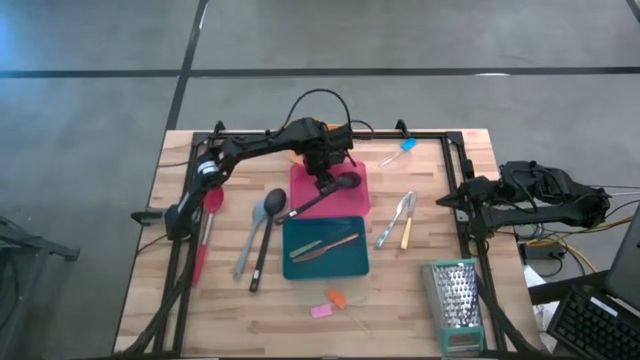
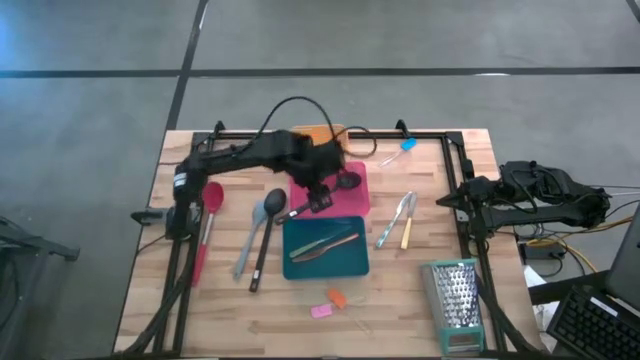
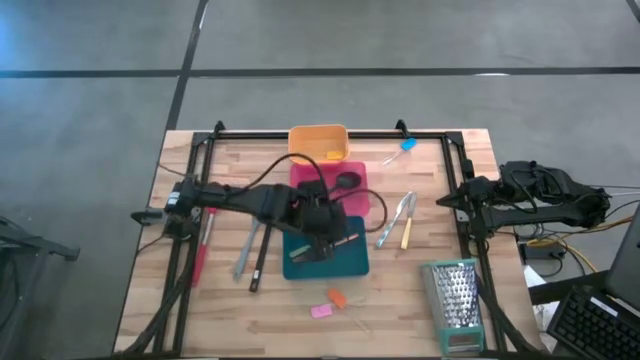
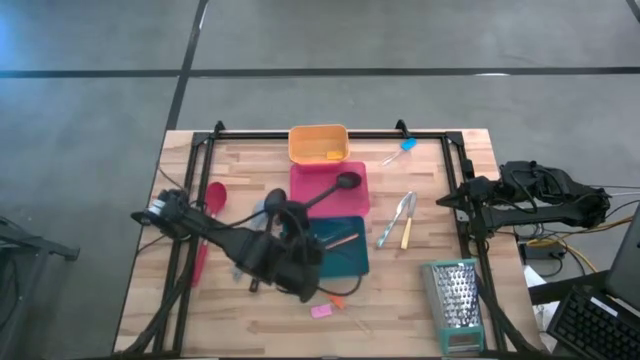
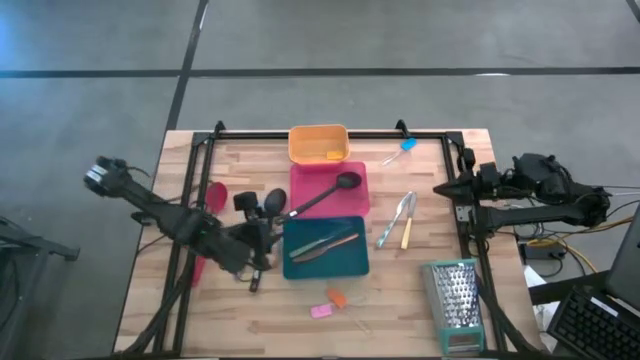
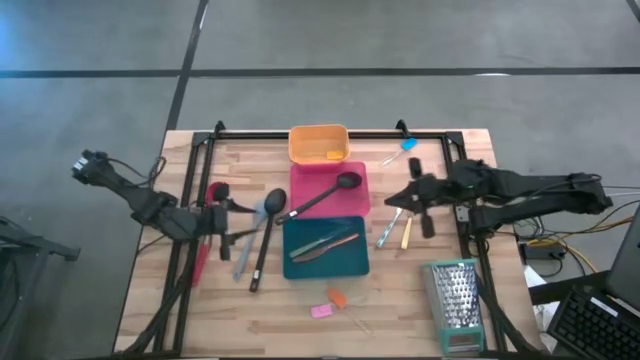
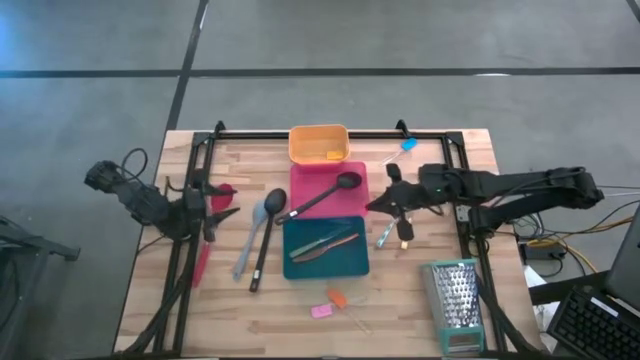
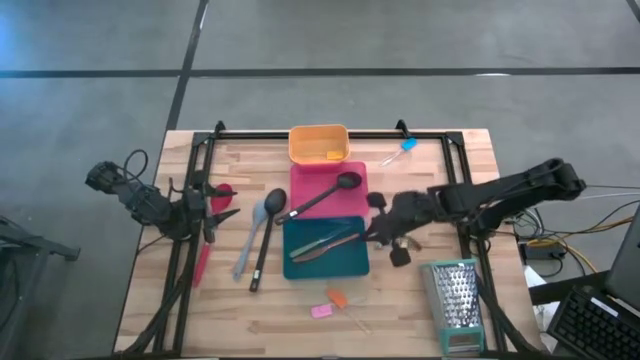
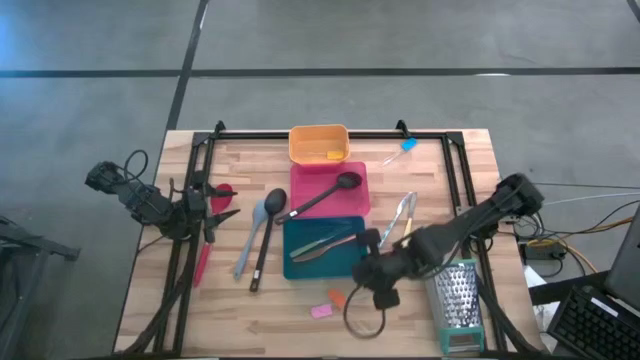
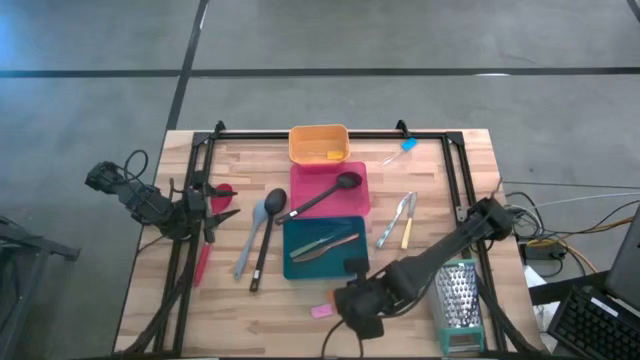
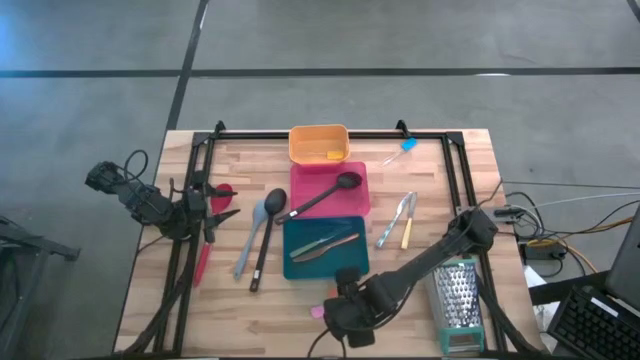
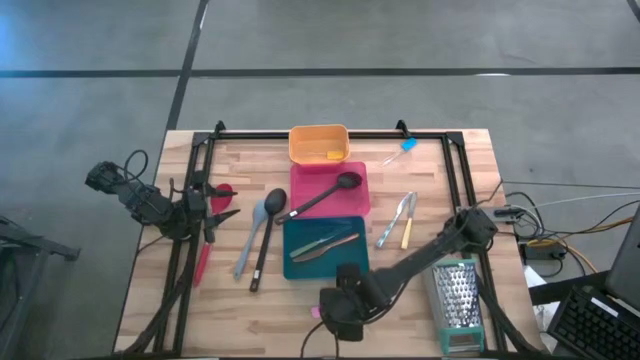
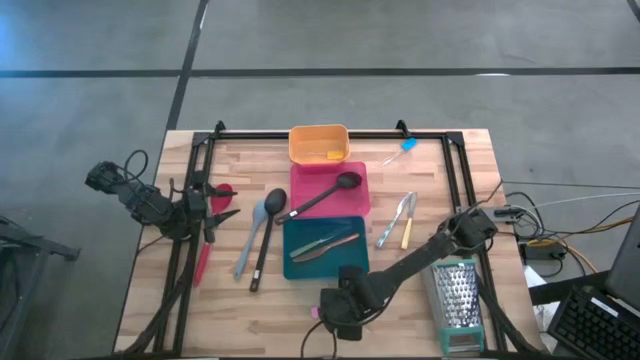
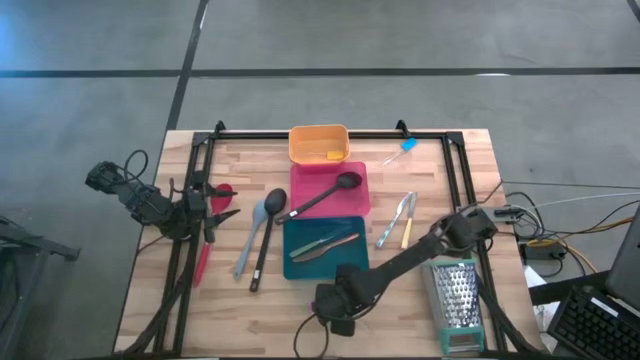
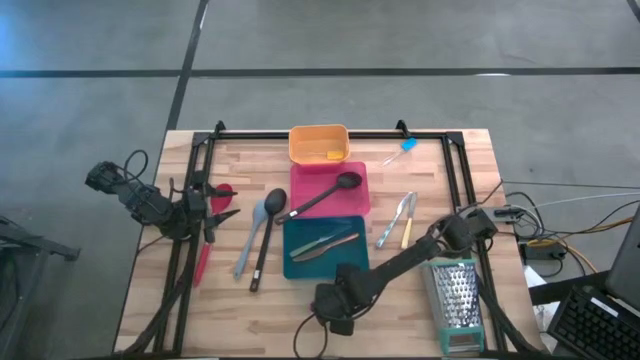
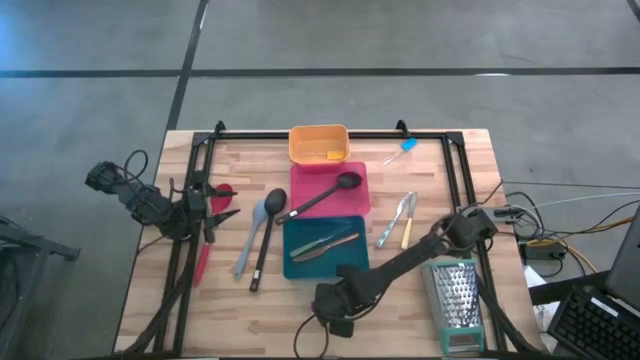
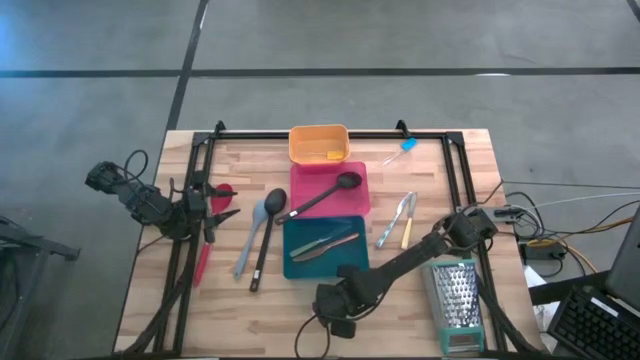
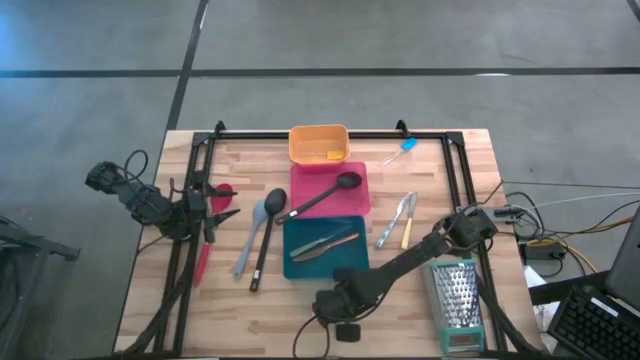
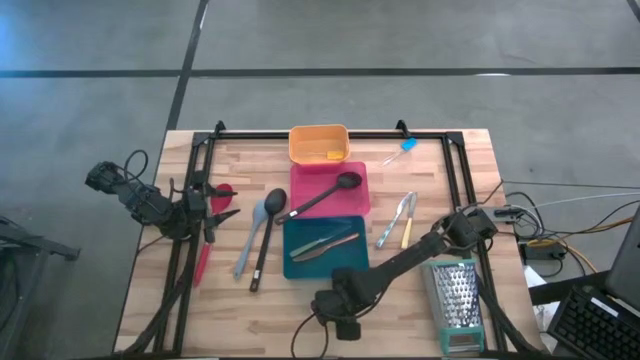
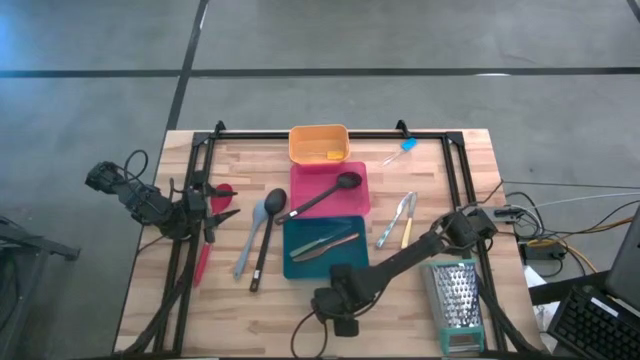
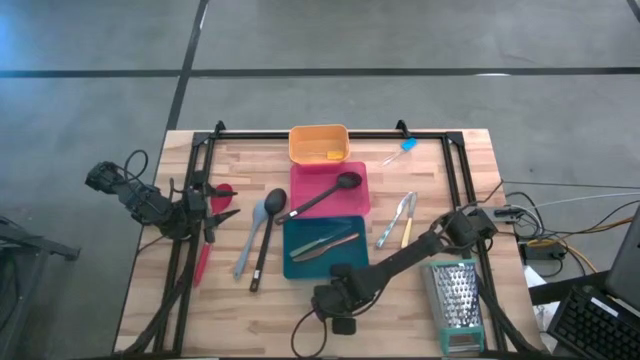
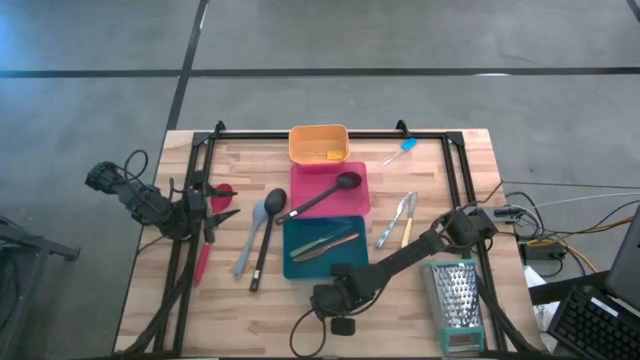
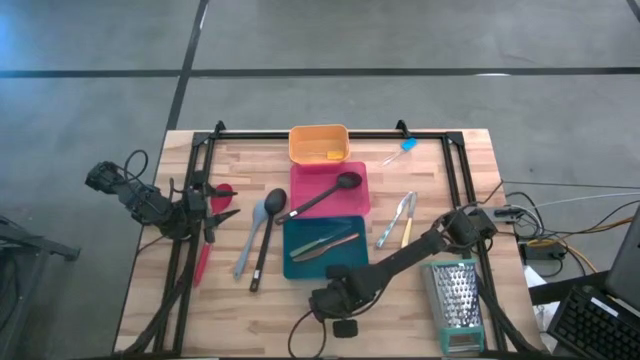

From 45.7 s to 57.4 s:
Task: Pick & Place Kitchen Items
Put the orange spatula into the yellow bin

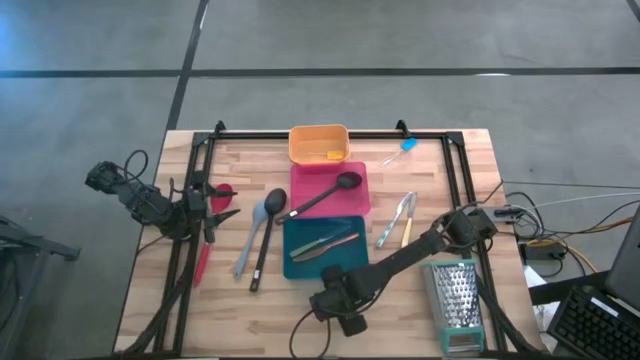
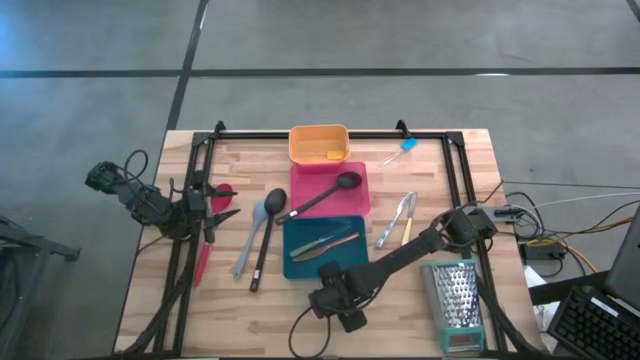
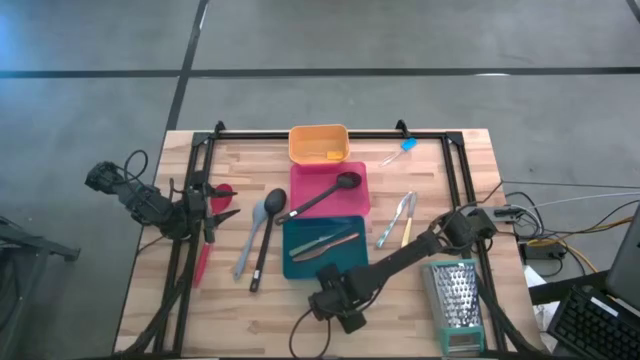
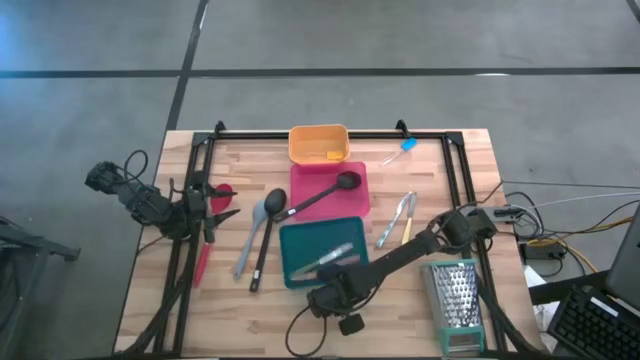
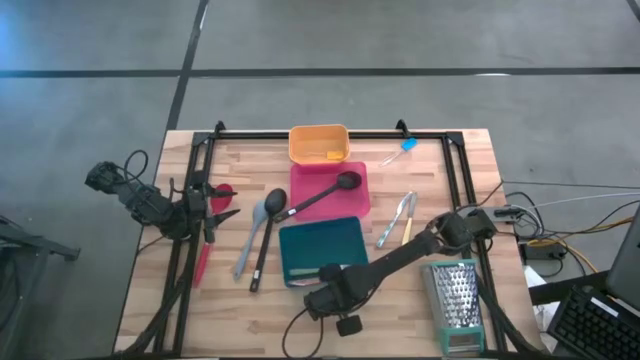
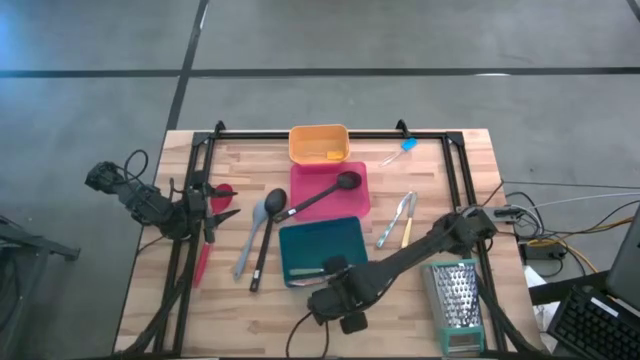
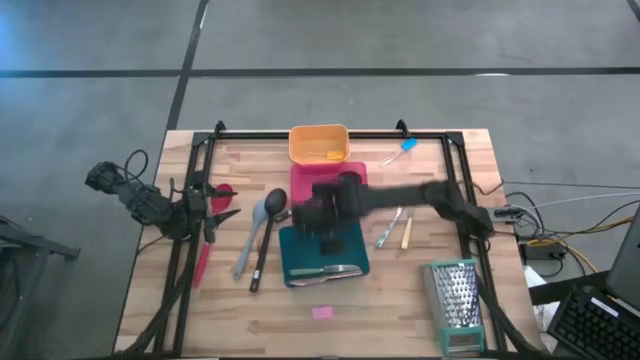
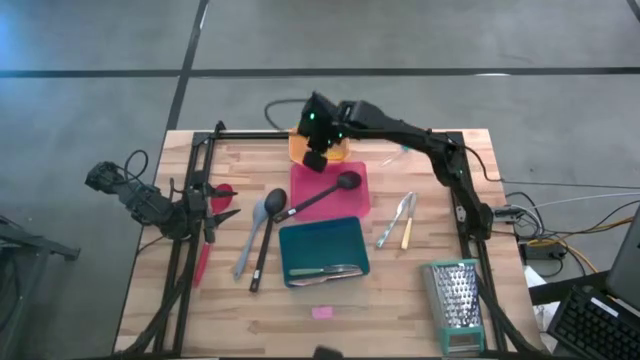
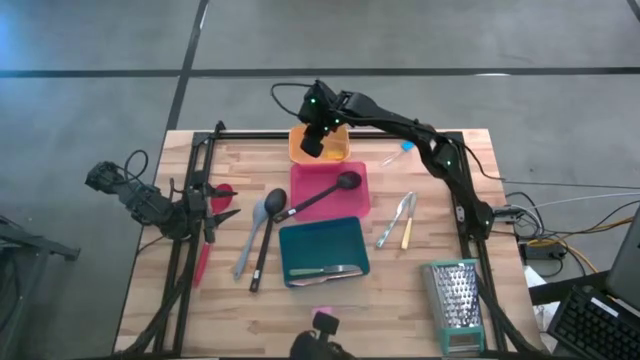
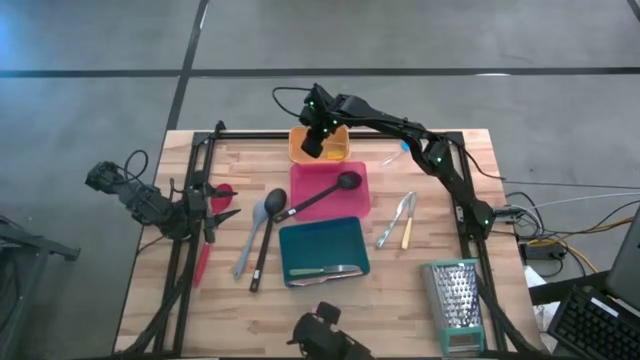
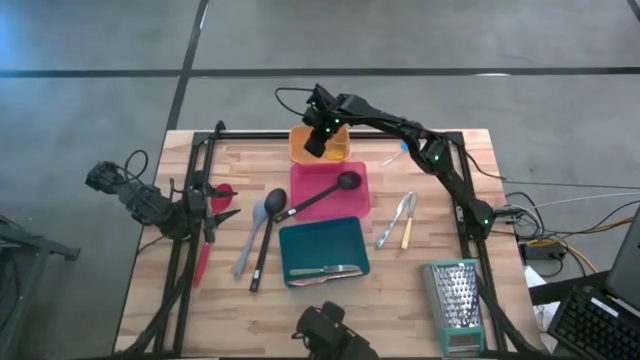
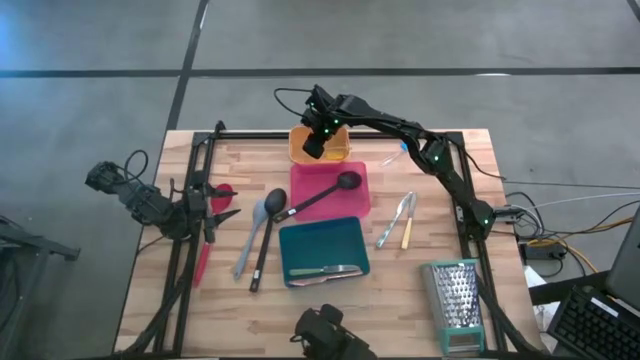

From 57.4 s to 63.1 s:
Put the orange spatula into the yellow bin

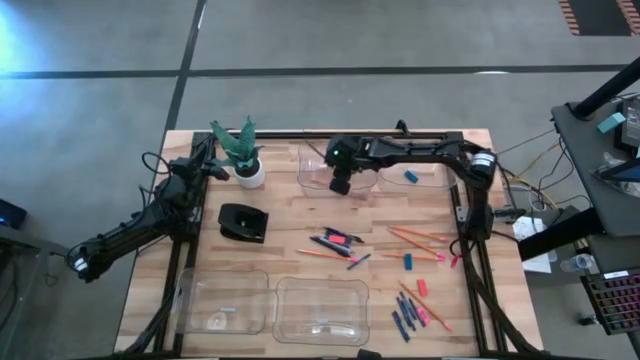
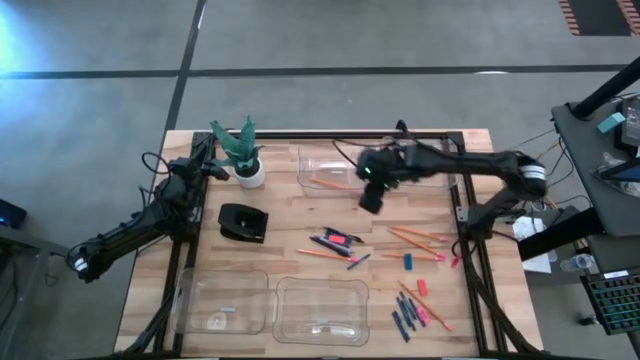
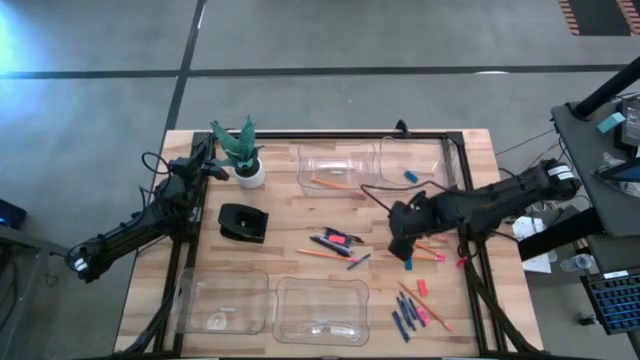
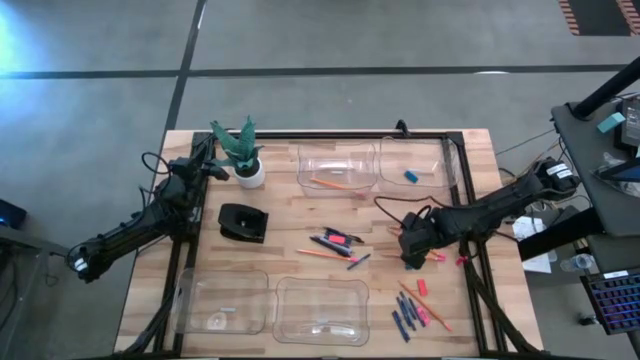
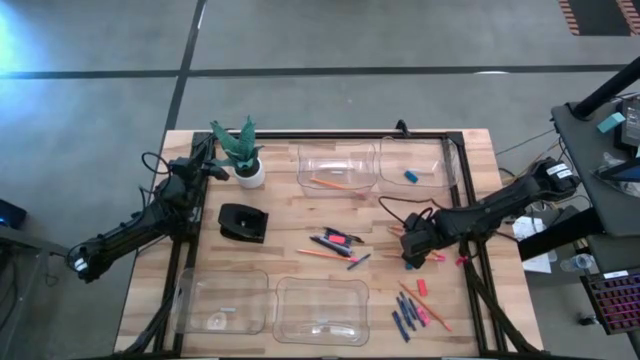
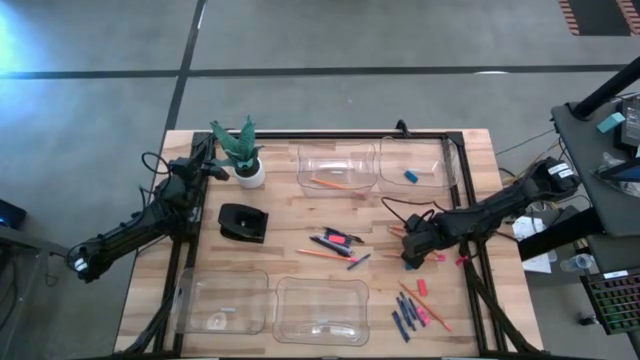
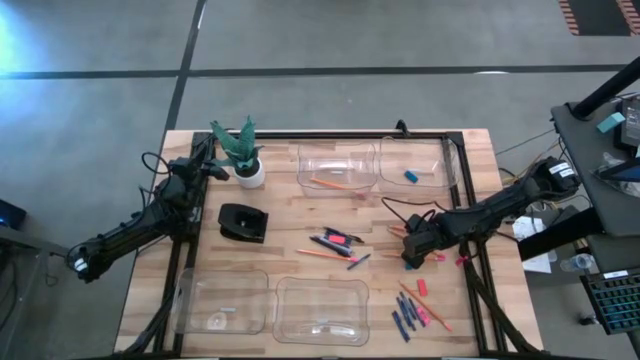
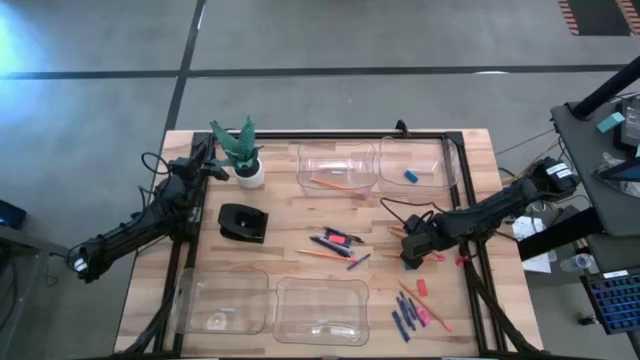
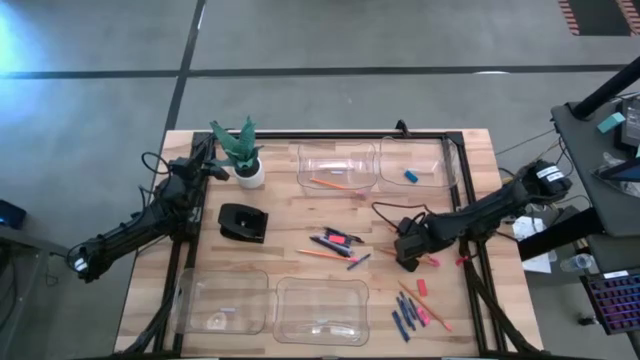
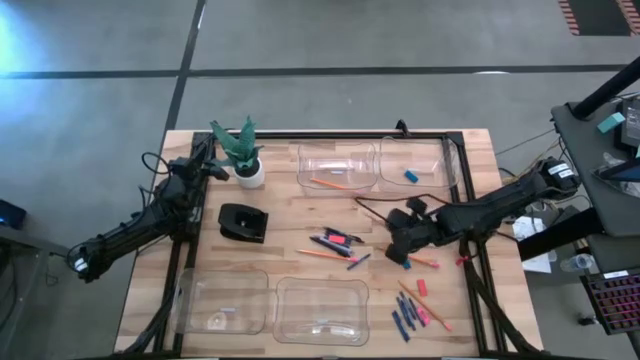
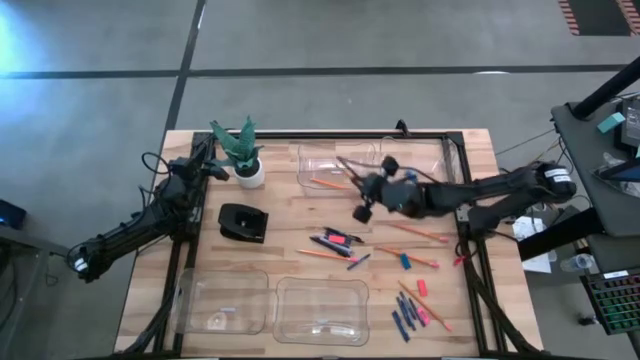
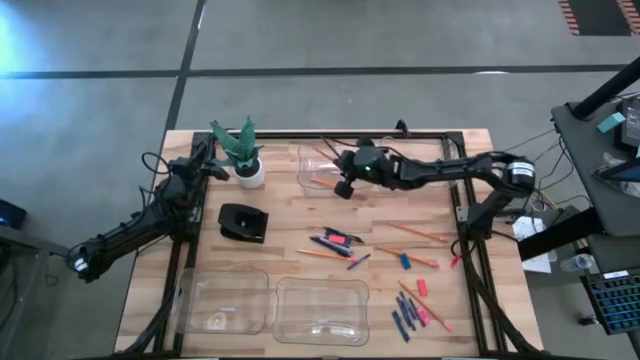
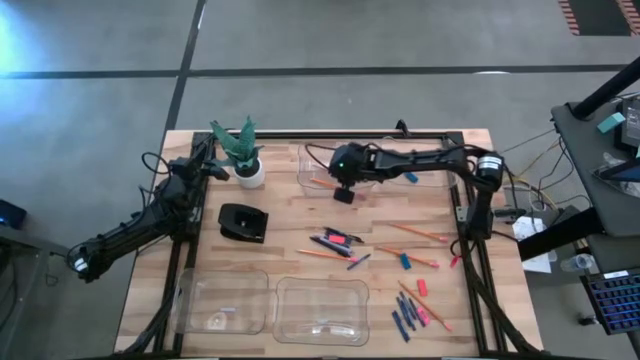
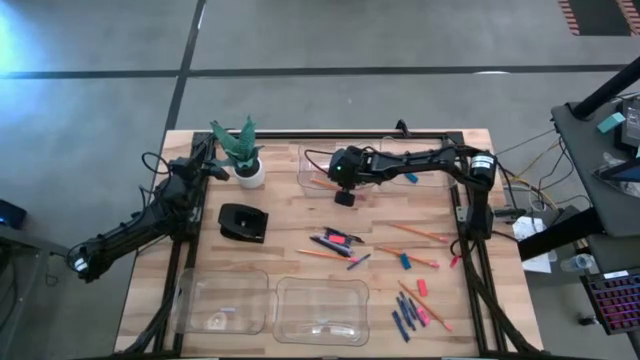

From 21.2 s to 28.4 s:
Task: Sort crayons/erasers/pens/pencils in bins
Put the yellow pencil into the top left transparent bin
